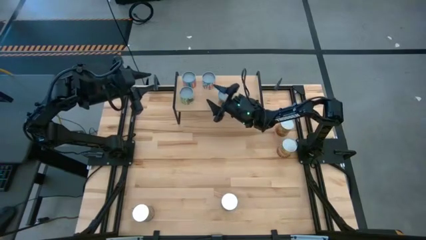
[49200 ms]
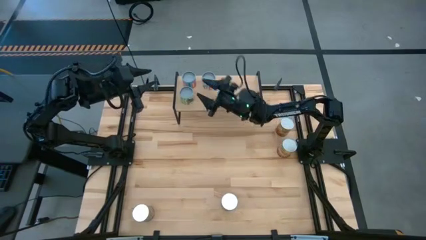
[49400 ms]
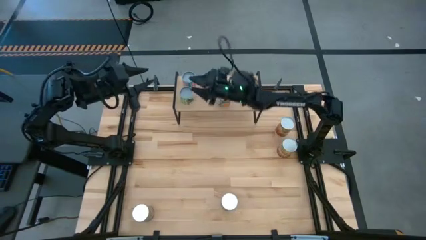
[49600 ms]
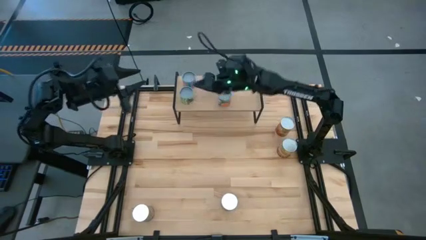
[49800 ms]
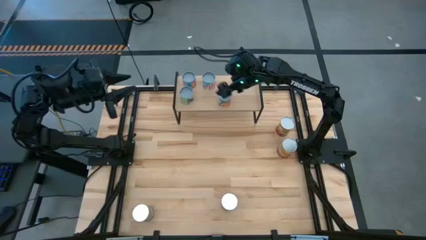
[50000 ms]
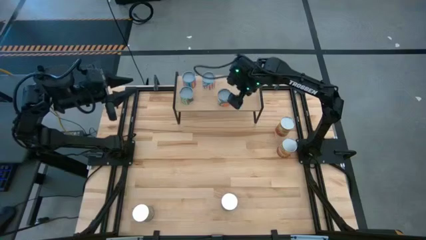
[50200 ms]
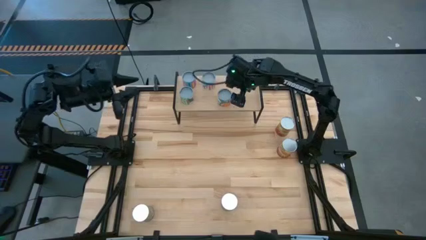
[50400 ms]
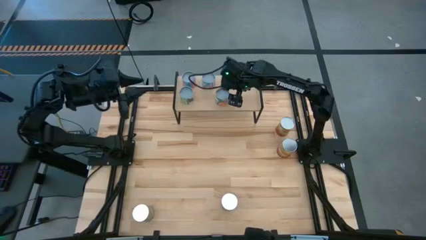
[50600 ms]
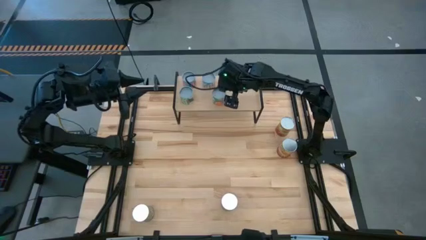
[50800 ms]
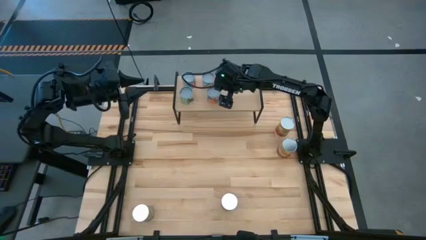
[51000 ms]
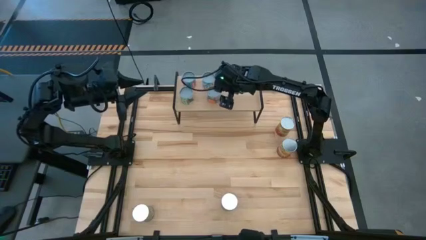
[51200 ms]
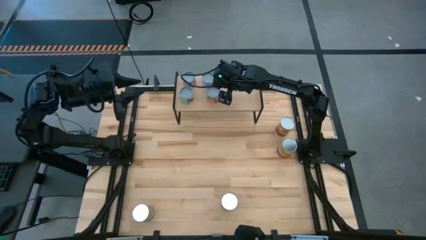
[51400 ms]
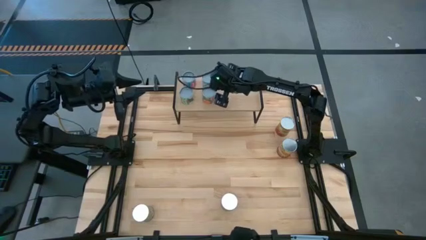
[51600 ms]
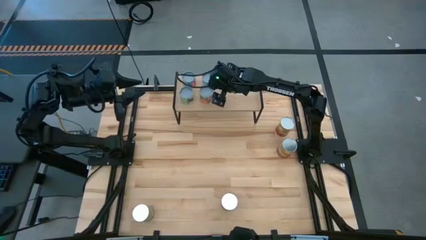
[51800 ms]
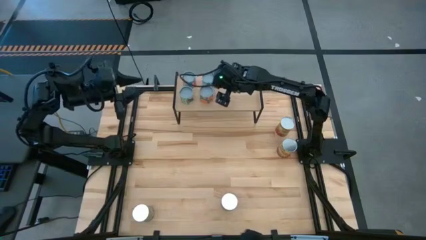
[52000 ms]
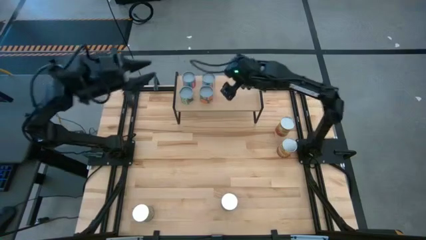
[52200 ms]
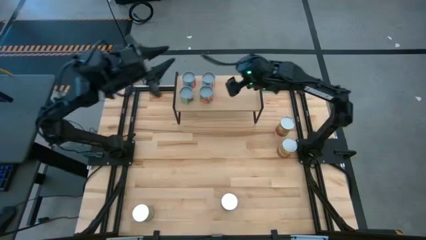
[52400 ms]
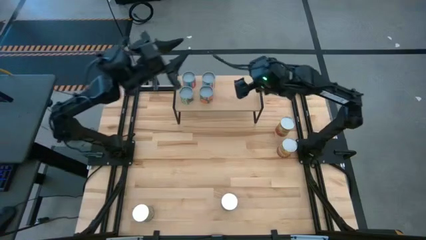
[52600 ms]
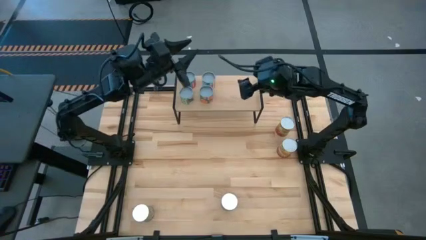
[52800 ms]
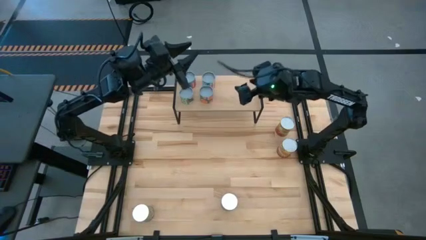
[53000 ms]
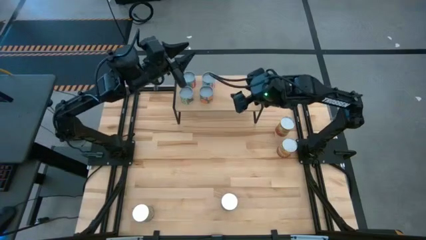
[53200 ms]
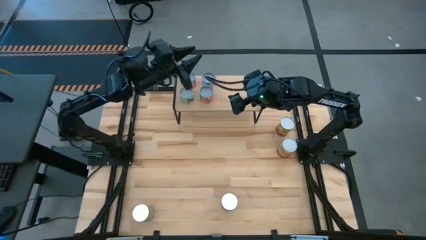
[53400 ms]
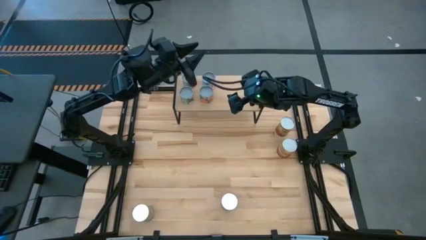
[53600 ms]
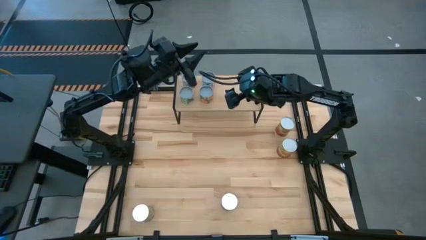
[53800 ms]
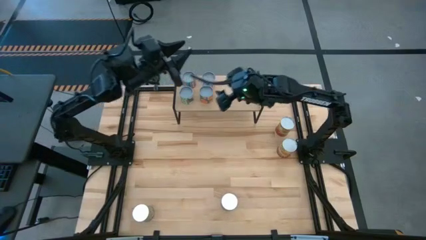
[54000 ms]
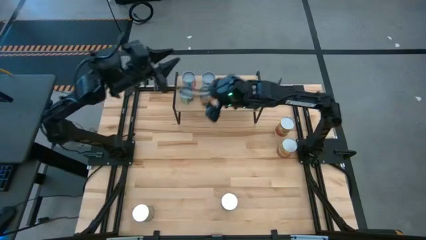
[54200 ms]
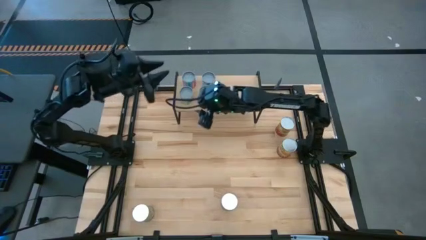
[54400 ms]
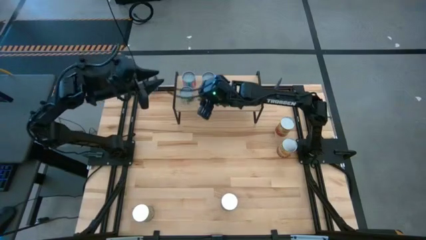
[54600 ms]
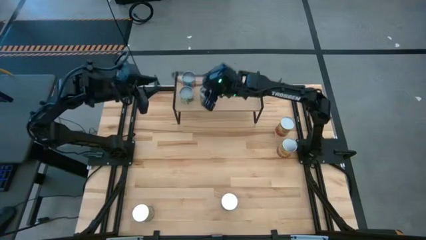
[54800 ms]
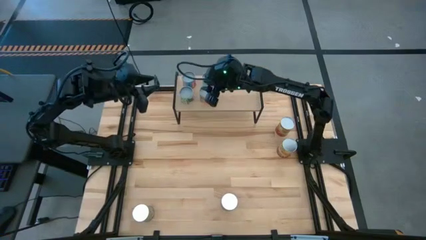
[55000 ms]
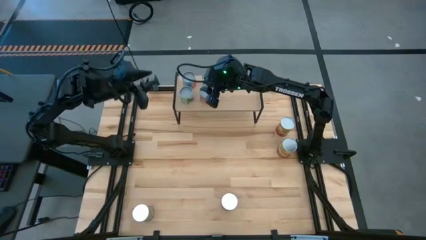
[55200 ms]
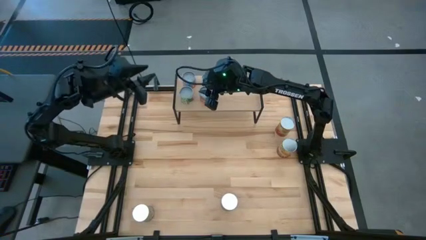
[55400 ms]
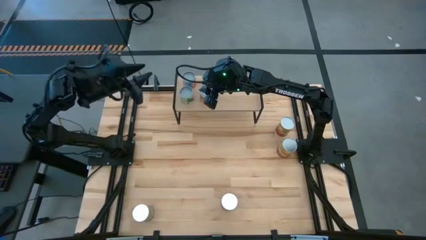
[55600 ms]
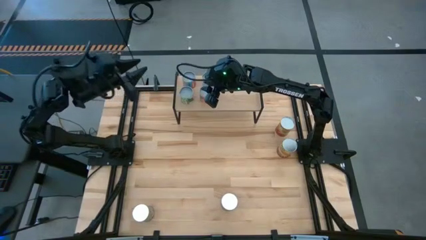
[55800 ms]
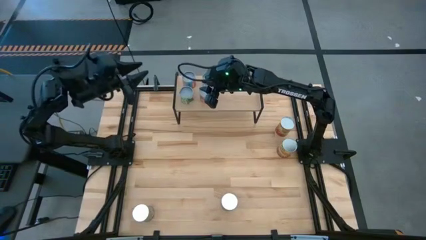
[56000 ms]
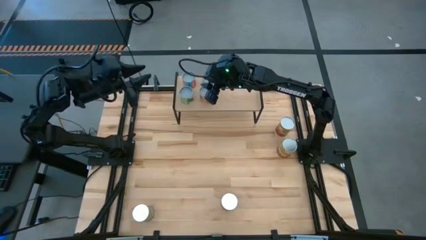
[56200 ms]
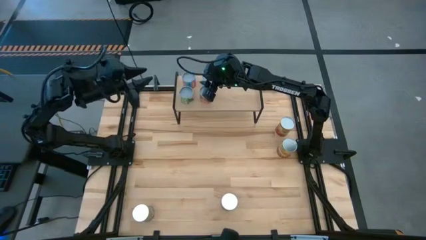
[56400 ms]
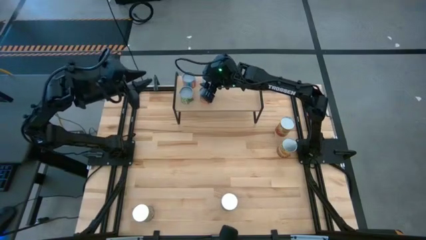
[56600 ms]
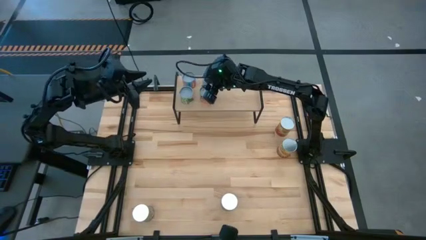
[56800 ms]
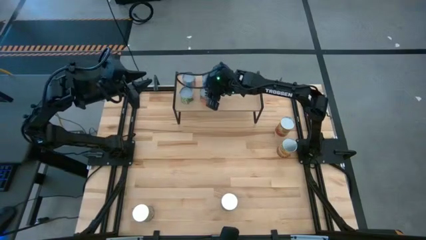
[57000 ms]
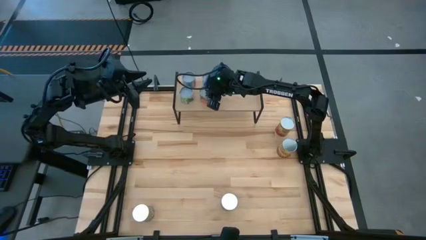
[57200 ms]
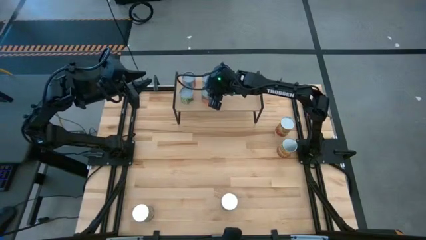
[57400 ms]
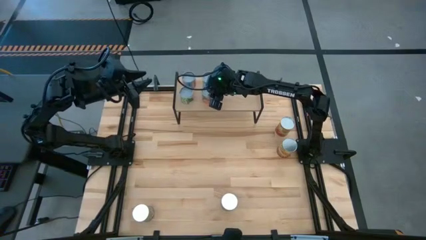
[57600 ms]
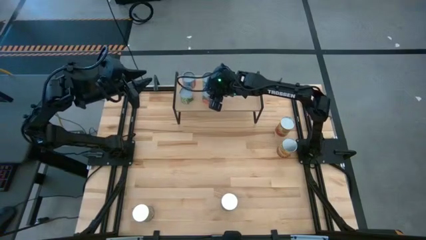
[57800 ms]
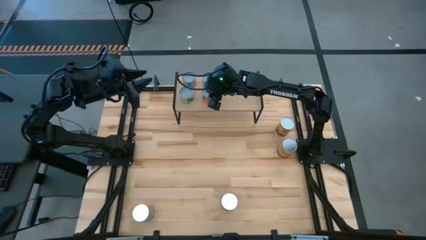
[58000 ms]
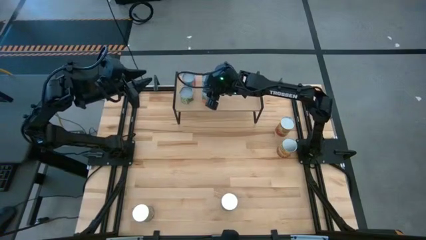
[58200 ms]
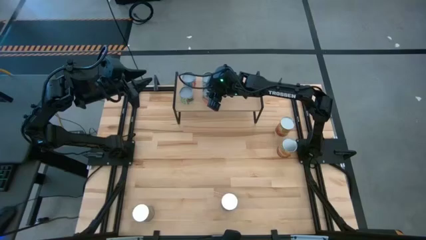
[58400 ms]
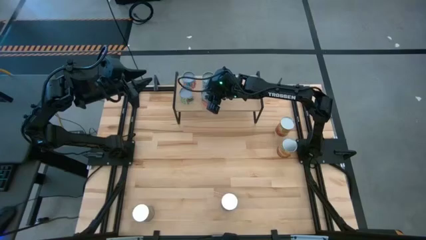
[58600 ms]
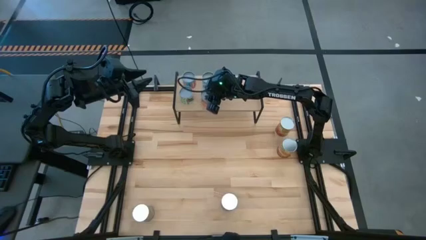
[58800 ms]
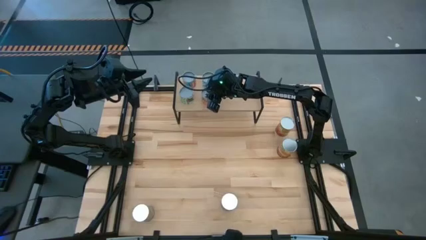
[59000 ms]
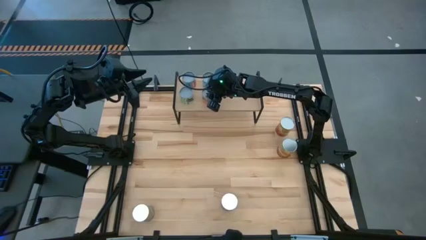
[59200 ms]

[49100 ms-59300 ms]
Task: Pick and place cans onto a shelf
Put the can of oranges on the shelf aligned with the can of carrots

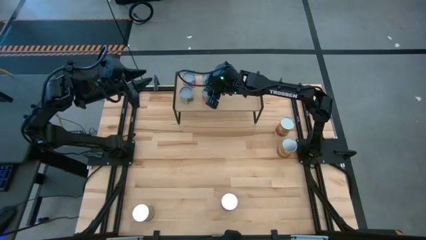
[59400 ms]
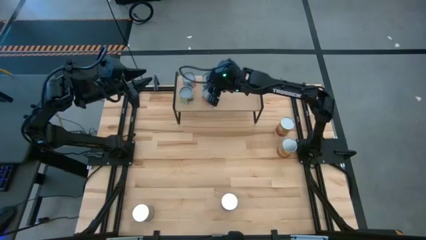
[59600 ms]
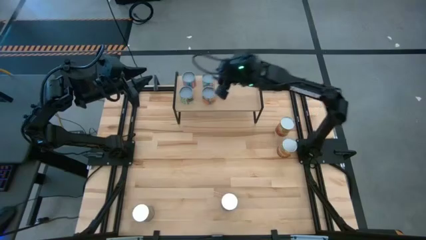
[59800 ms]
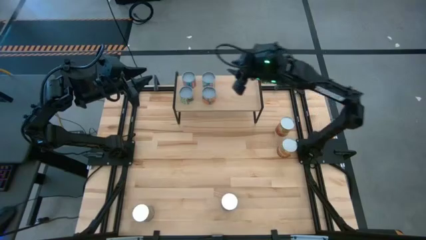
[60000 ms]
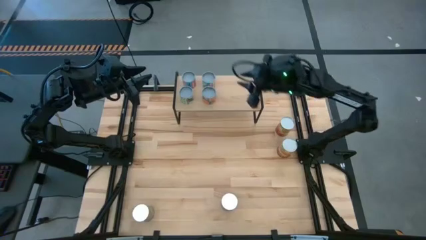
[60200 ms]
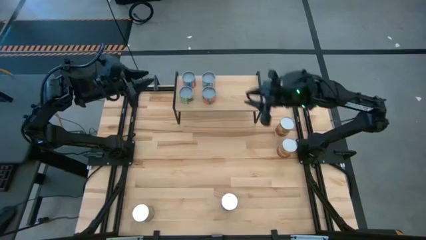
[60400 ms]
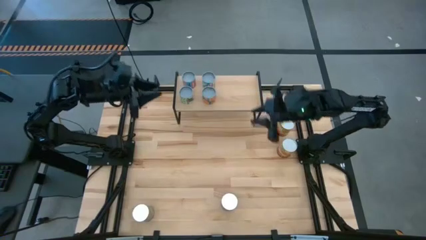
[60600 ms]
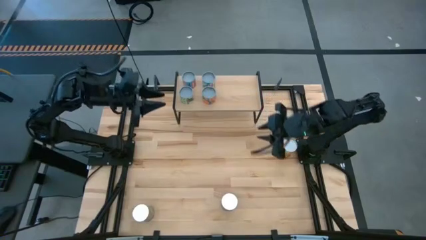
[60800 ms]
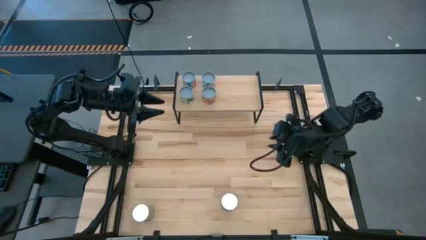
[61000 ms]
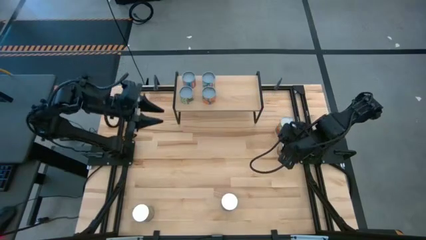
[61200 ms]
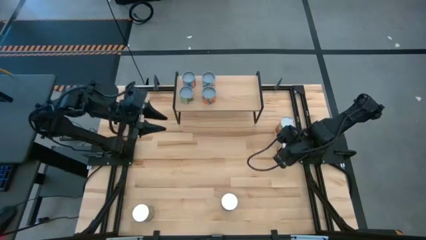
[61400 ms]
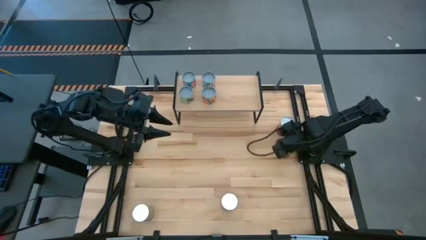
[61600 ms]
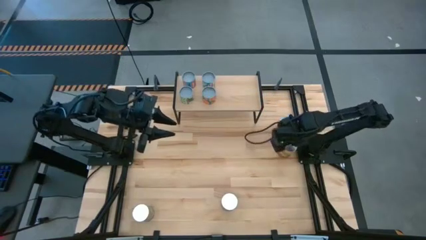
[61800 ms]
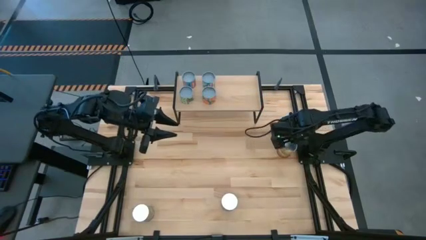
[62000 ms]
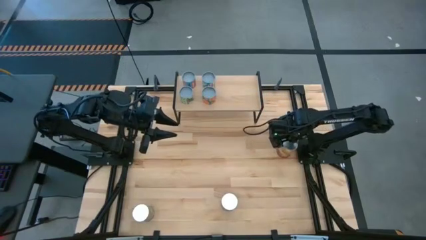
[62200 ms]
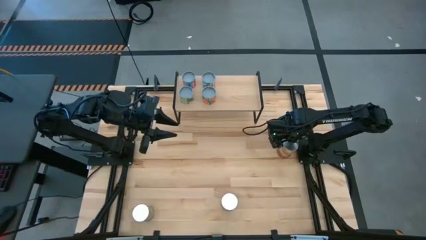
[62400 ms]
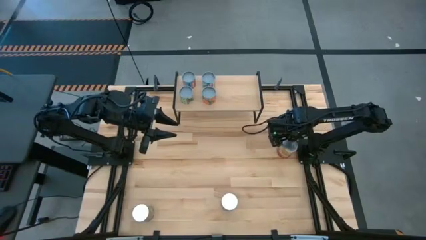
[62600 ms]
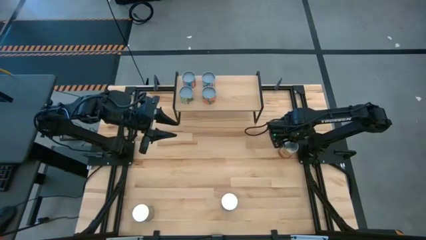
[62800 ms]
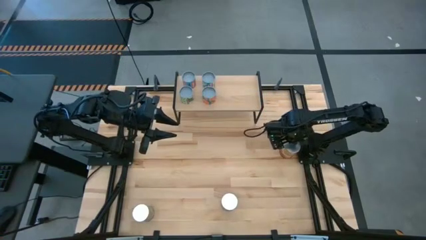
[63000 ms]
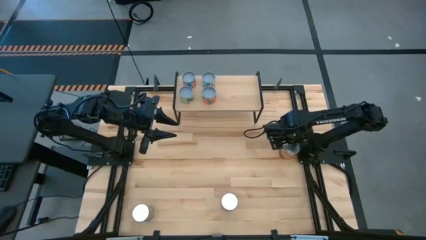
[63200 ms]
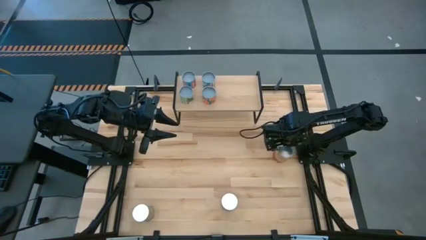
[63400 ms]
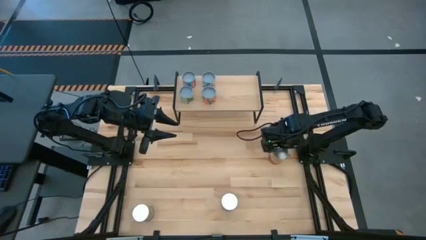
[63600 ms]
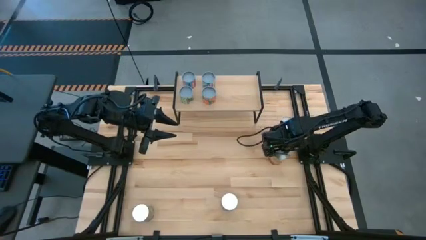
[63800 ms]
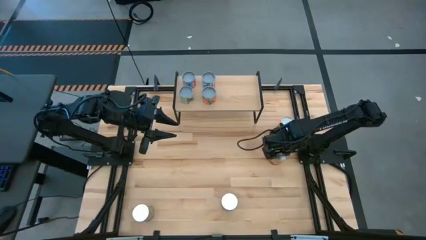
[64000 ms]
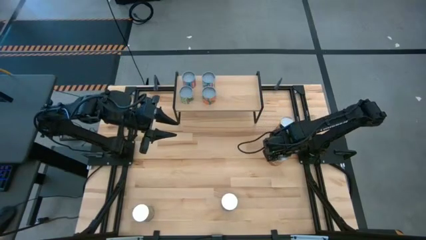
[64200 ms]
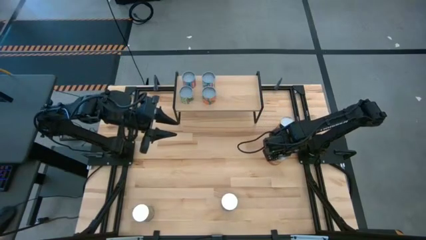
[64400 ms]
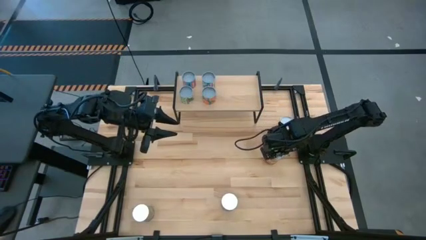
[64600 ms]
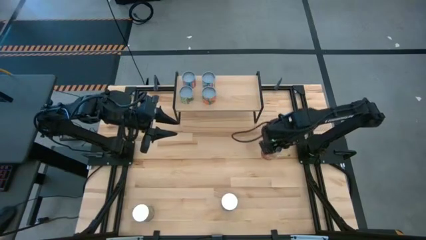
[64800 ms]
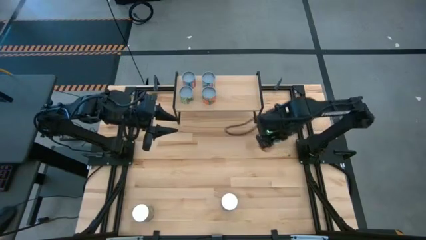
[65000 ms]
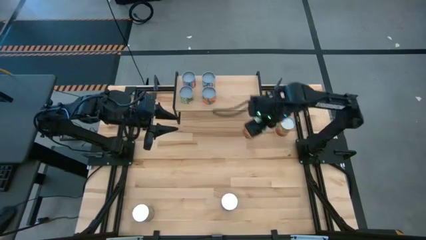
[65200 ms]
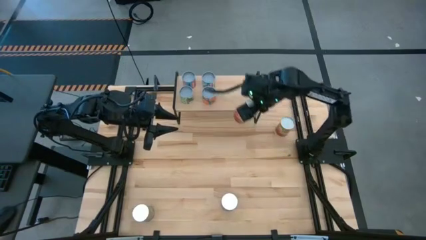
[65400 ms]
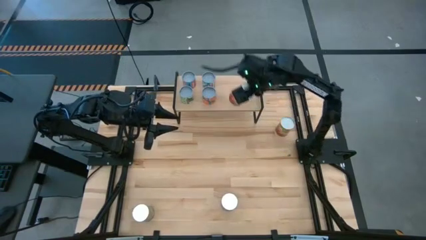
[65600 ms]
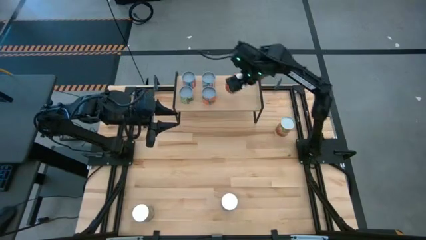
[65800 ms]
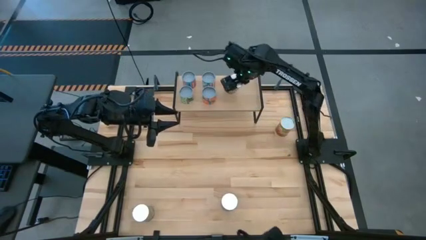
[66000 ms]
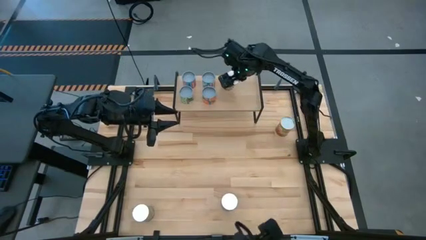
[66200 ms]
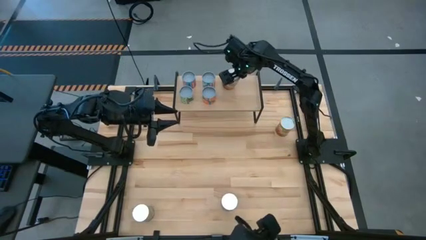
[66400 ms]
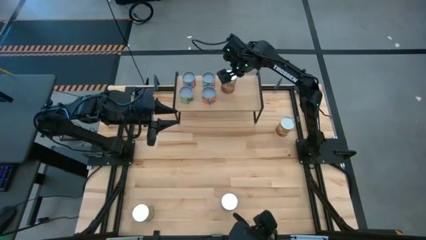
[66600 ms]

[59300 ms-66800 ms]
Put the bottom can of corn on the shelf

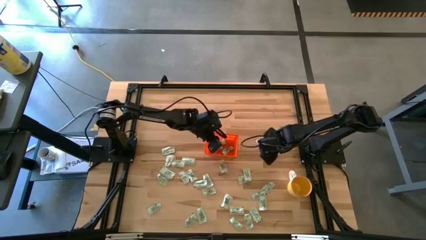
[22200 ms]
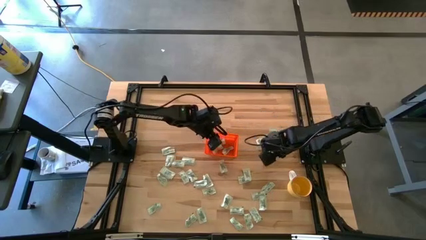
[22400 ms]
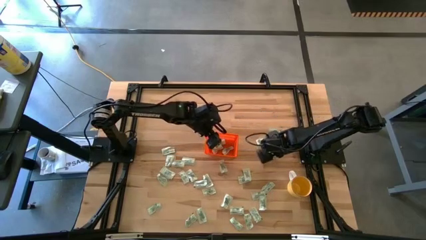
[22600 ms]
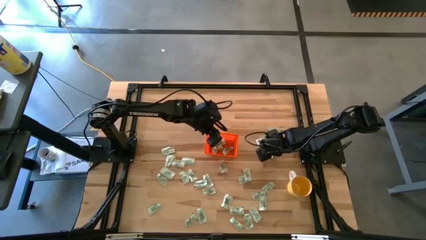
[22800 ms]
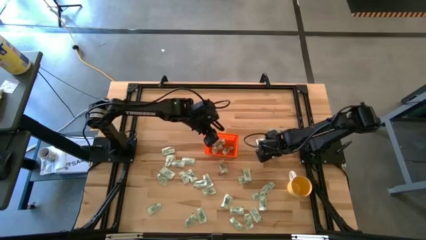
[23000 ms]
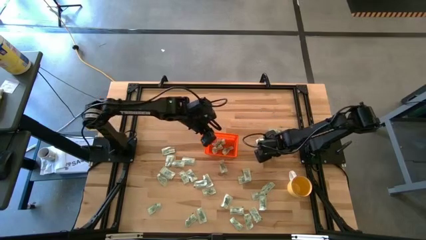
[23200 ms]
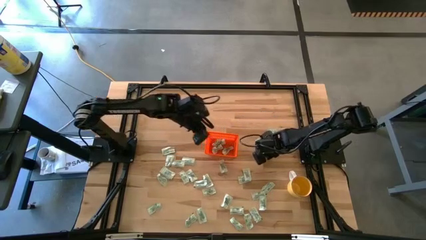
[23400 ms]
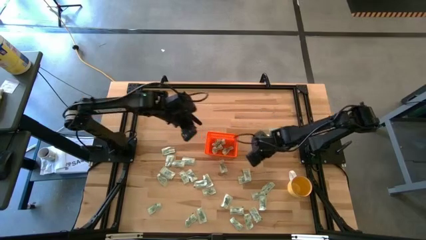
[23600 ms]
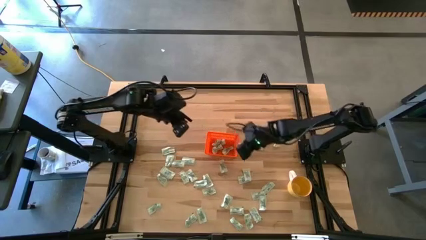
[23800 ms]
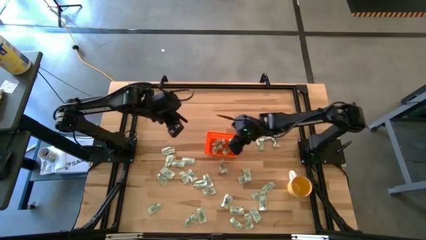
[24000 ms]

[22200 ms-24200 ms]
Task: Pick and place Stevia / Truvia into bins
Put the light green stevia packet into the orange bin
